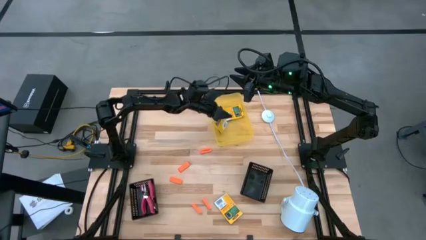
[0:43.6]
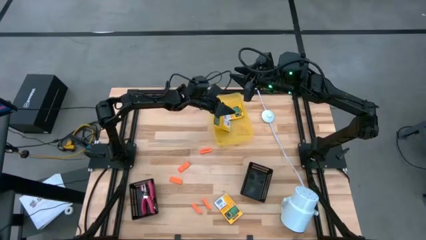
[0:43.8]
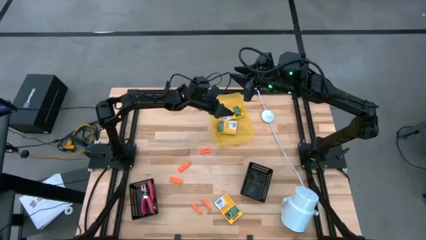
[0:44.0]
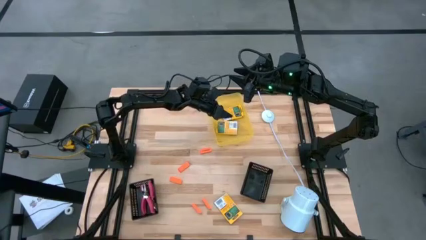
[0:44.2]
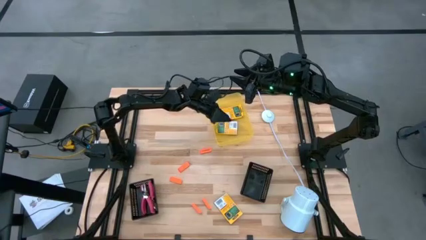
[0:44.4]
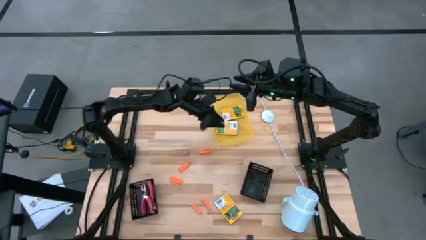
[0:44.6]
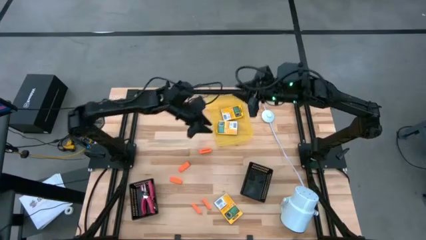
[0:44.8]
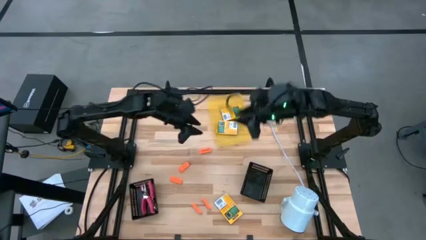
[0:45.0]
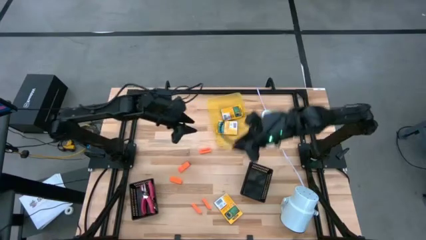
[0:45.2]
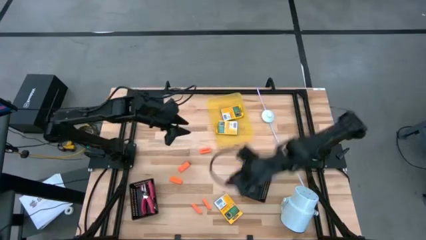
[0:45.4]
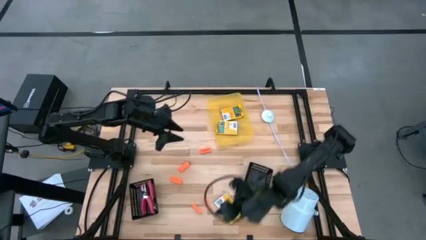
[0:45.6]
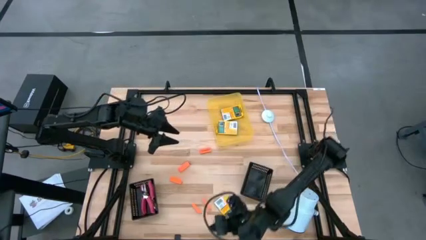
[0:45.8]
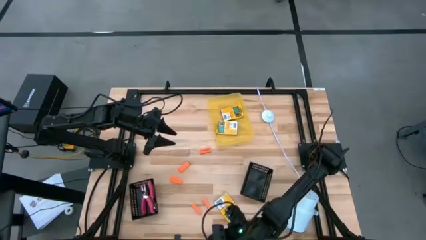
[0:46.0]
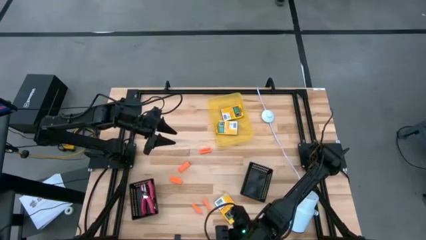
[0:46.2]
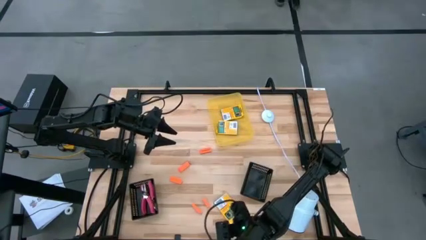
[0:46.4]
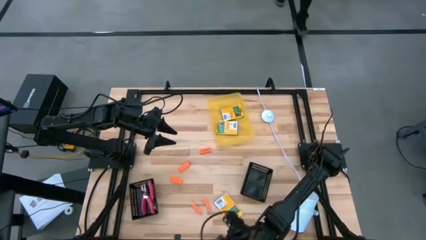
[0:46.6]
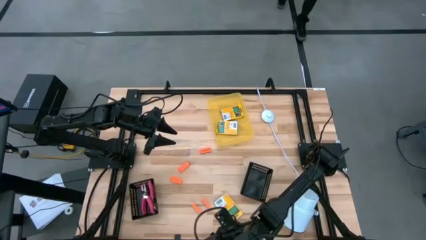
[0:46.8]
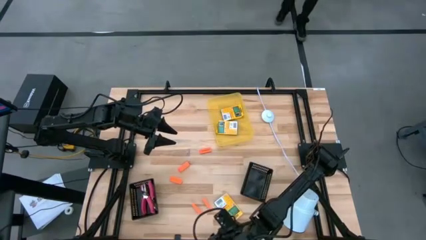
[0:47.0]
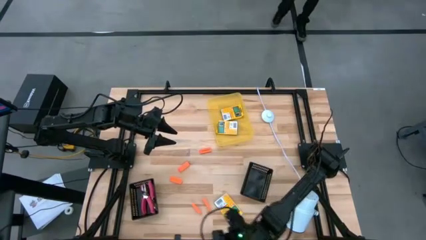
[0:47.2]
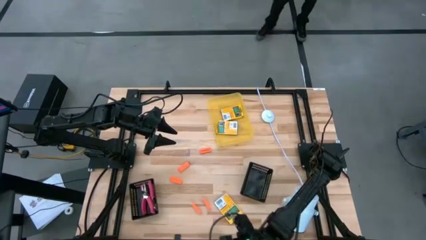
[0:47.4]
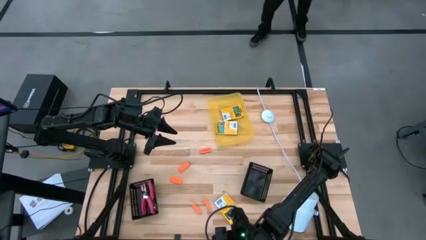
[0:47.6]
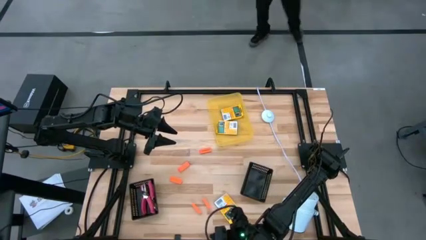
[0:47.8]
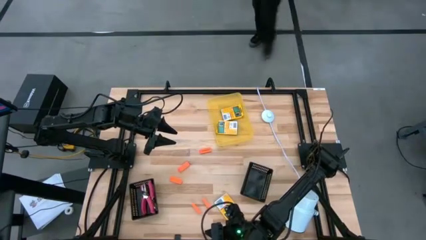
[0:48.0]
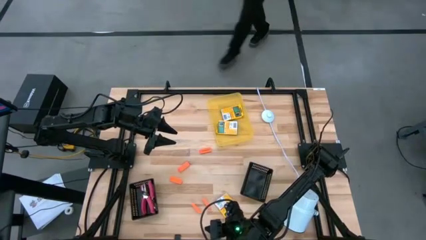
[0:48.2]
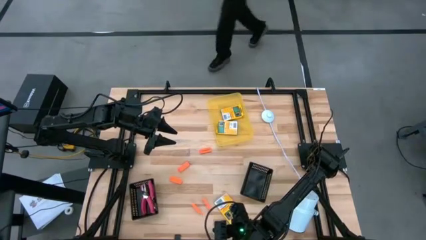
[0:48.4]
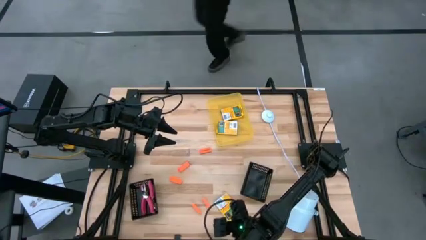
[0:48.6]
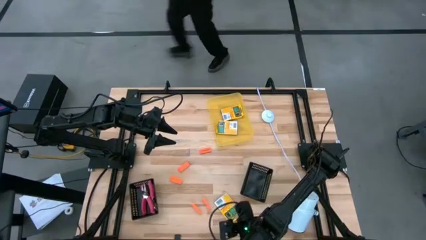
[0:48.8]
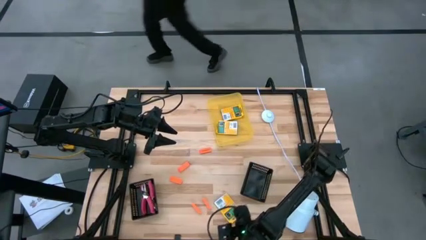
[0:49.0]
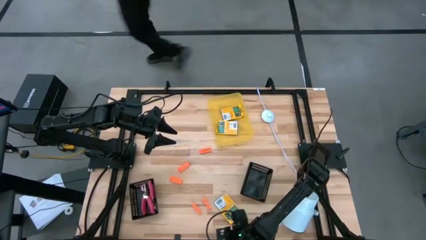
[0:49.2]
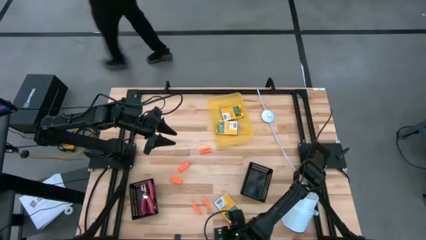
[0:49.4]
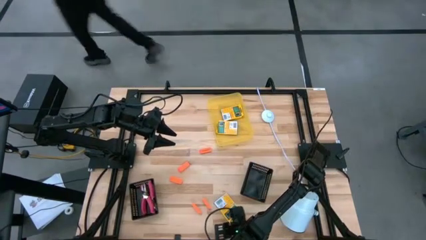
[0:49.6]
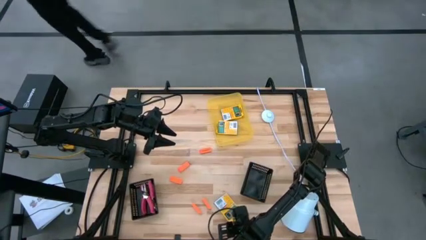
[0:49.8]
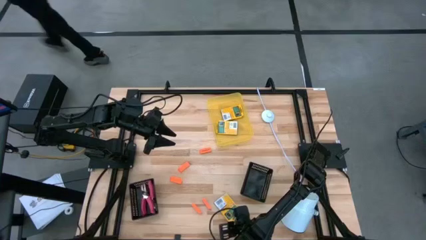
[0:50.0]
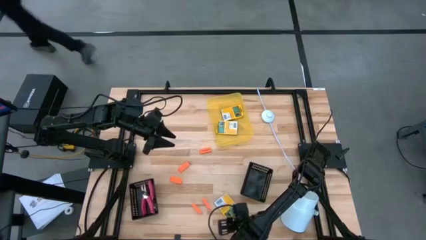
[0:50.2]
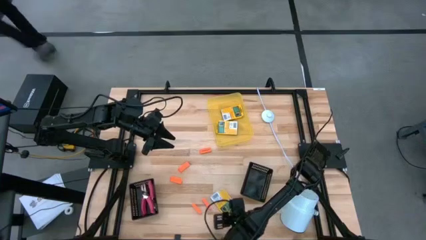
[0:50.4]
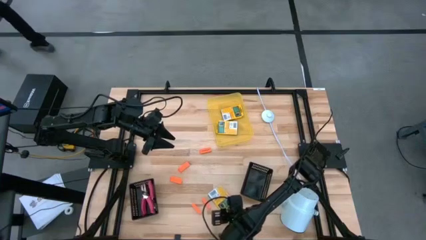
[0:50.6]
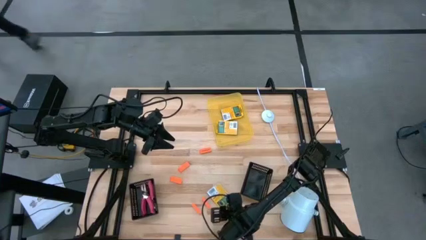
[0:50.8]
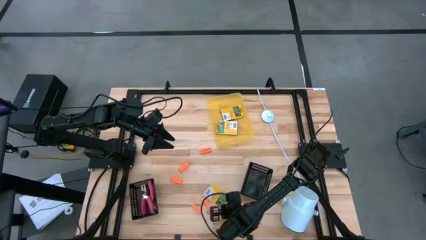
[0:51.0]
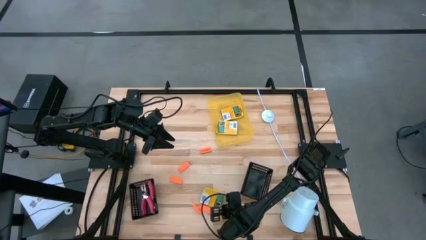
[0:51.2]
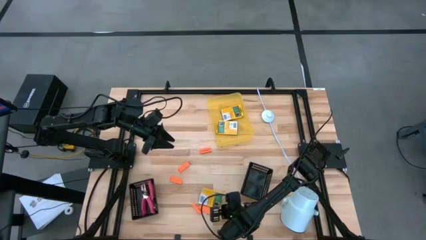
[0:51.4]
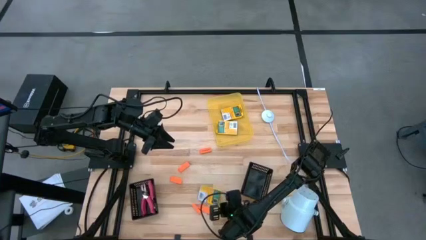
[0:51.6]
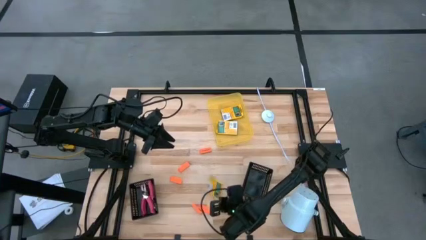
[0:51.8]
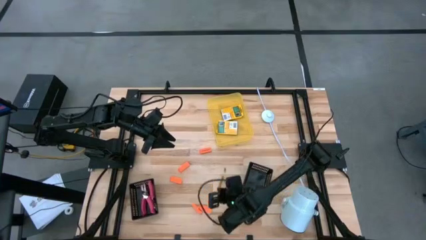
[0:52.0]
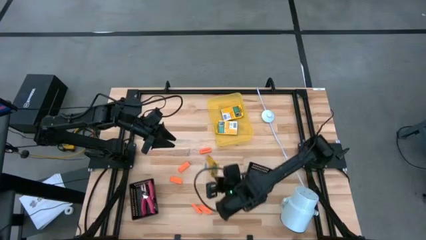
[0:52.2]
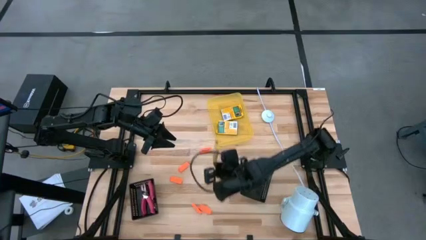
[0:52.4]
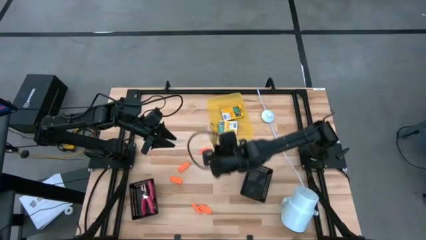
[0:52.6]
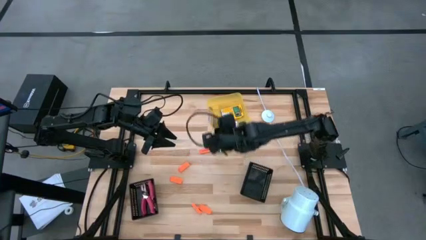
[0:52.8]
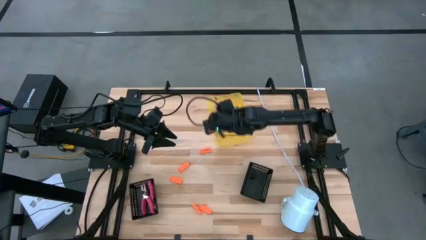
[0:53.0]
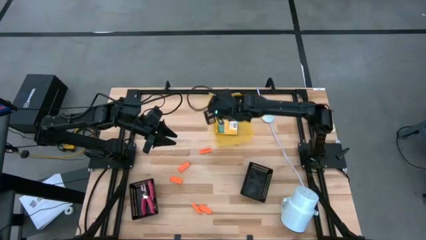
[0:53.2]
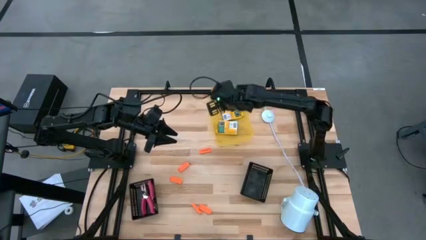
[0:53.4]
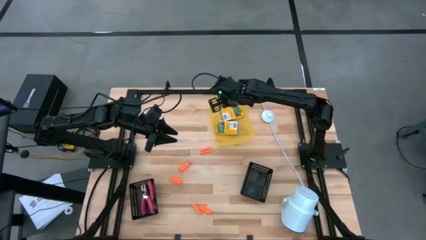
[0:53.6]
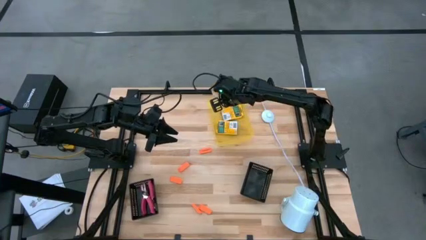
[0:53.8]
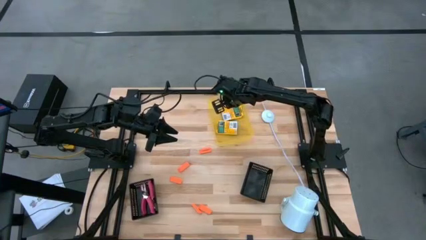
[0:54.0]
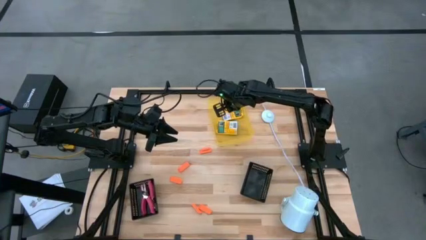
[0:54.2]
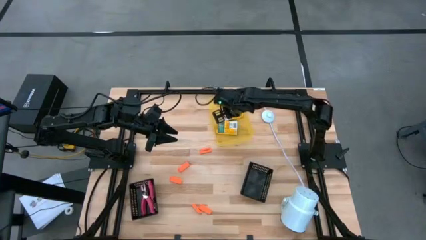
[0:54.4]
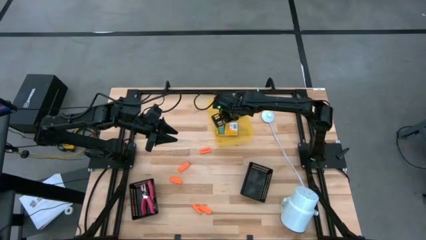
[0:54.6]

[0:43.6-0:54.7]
Task: Pick & Place School Supplies
Put the yellow crayon box into the yellow bin

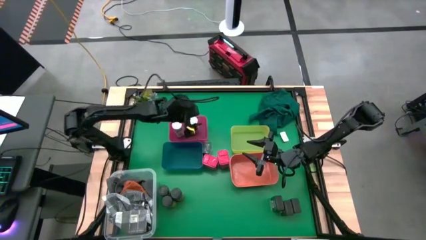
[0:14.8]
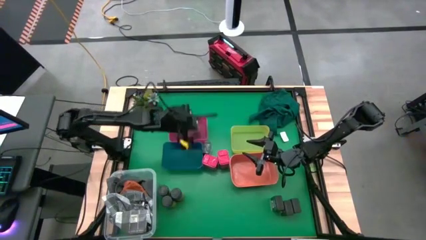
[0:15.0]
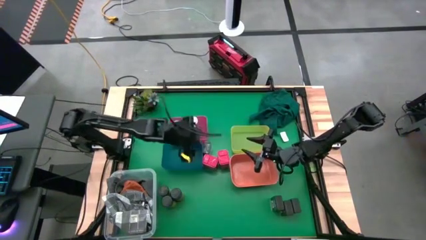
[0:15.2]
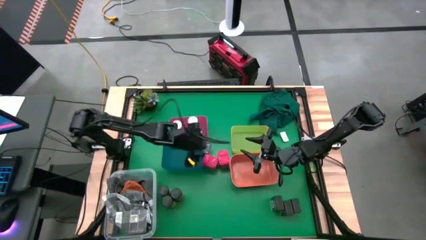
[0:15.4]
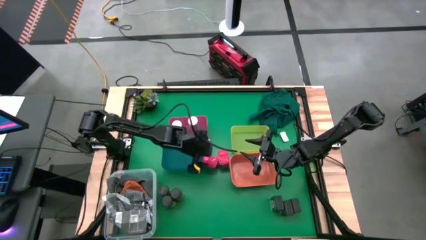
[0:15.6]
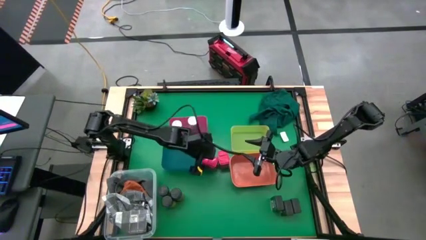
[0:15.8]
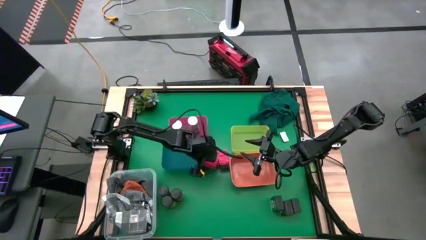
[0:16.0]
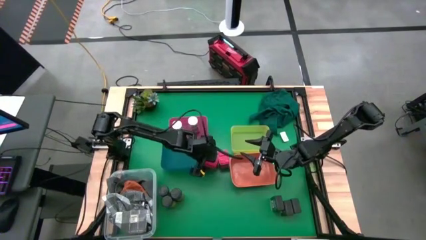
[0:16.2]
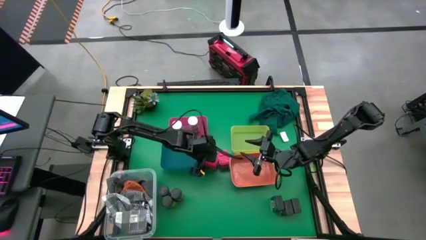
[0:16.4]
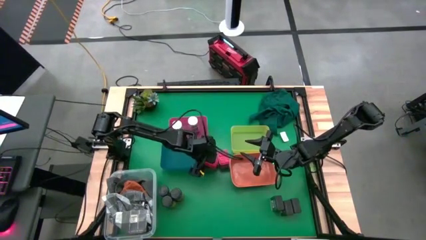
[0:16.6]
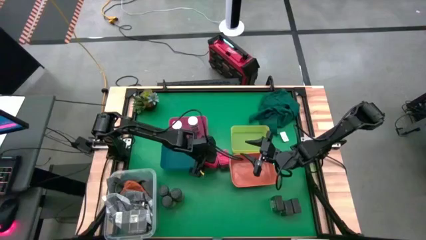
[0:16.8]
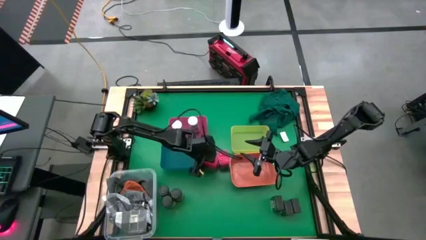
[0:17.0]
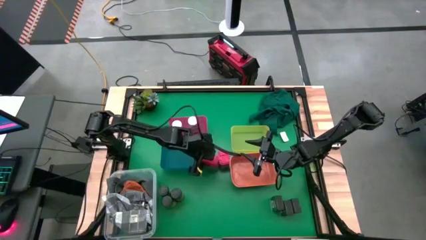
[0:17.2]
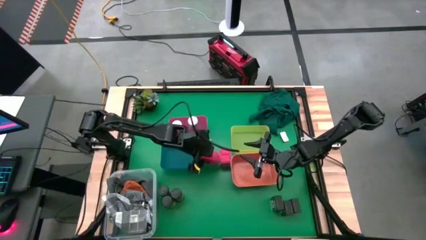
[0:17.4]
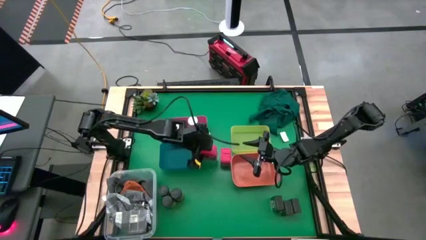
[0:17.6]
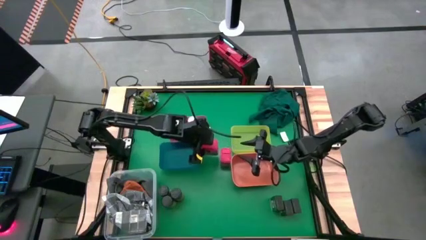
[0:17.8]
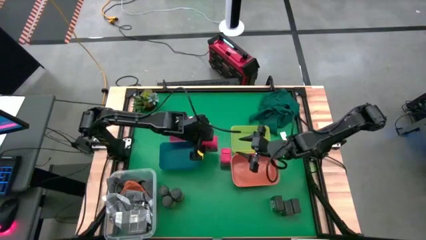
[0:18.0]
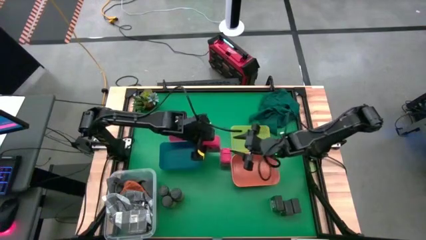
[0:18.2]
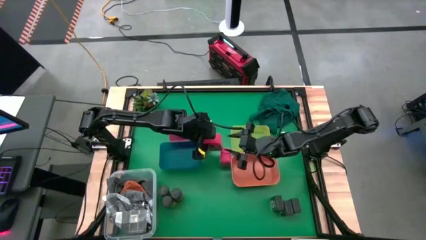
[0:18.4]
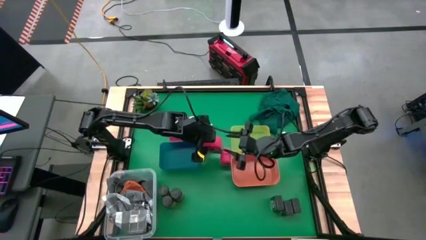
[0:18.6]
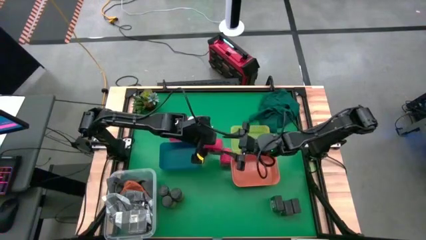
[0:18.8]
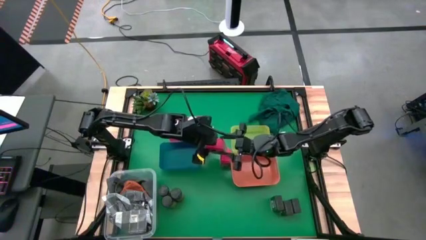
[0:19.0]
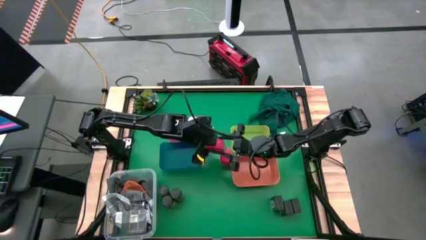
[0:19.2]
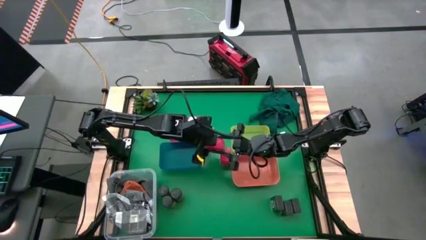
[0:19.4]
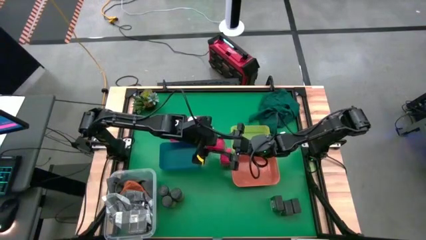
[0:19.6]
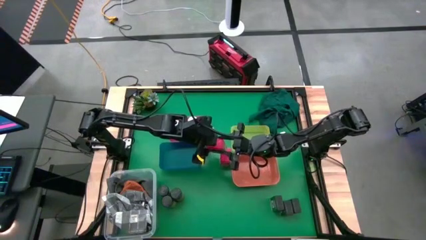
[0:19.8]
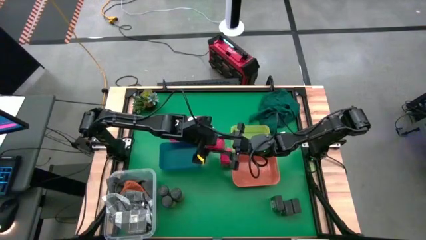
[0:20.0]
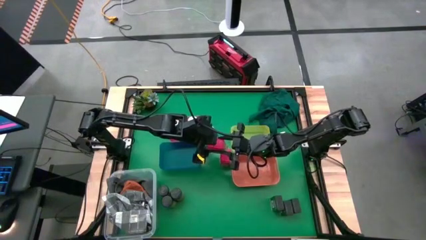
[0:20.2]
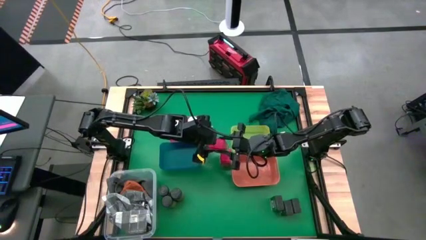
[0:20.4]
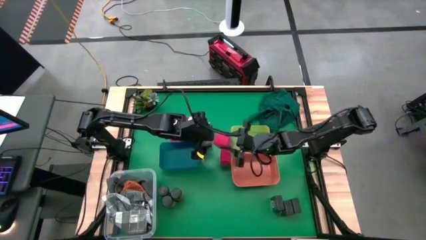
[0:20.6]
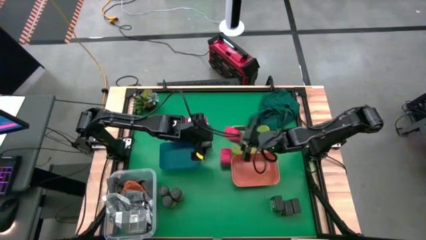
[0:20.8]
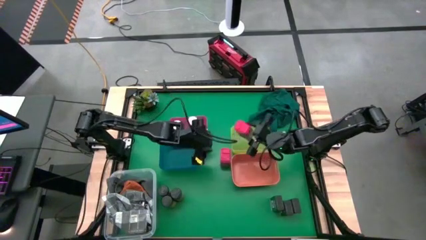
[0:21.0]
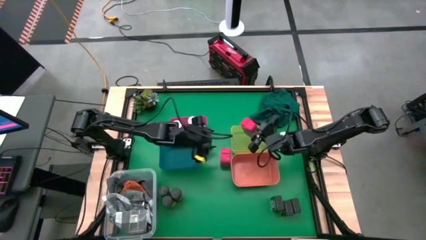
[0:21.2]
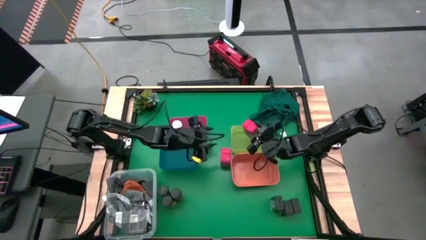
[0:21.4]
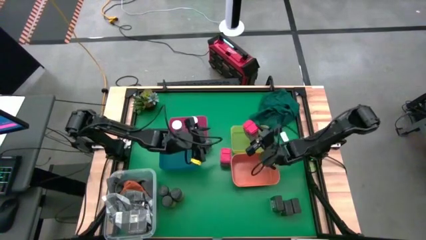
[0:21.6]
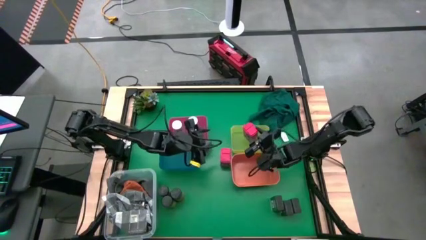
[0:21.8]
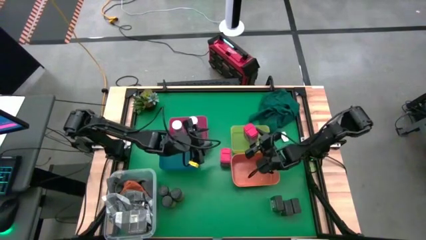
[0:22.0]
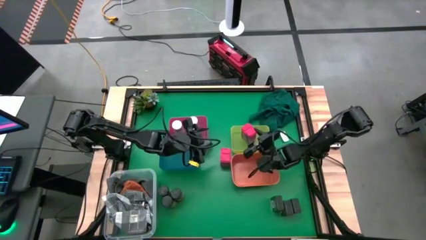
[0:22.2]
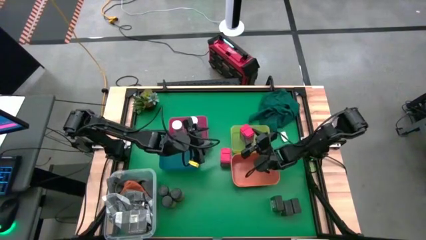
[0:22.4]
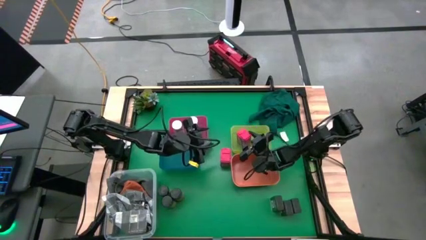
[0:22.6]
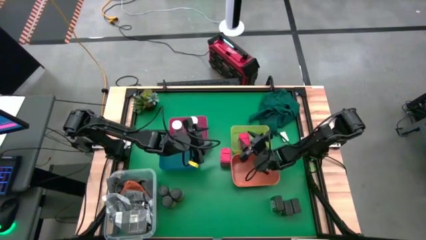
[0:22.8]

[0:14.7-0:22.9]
Task: Sort spices by type
Put the left red seasoning can into the yellow bin
